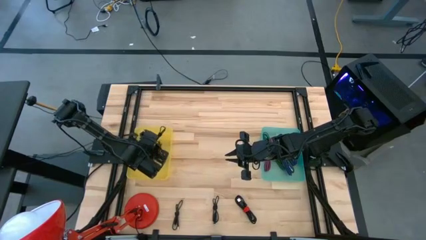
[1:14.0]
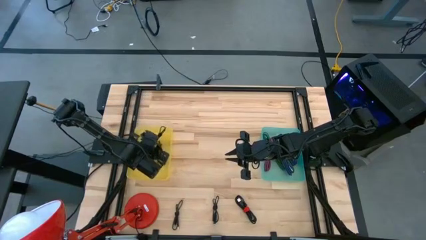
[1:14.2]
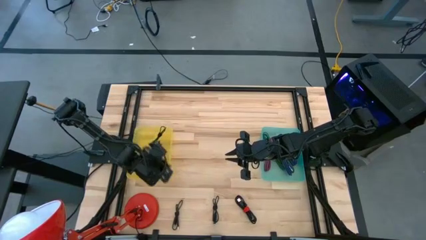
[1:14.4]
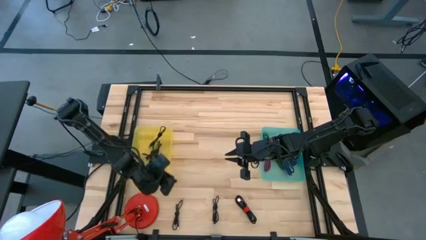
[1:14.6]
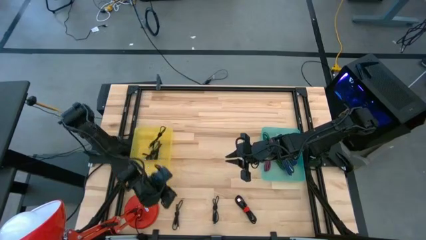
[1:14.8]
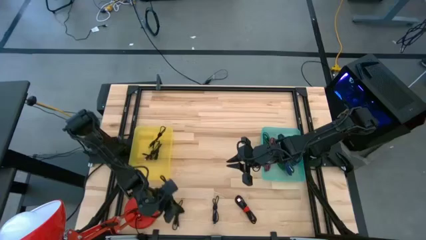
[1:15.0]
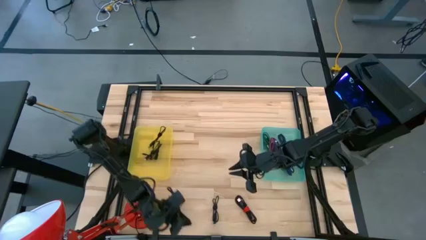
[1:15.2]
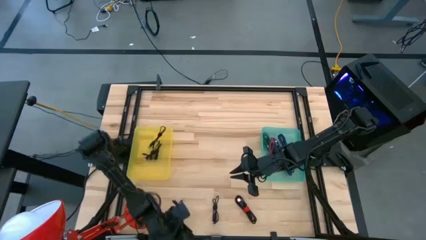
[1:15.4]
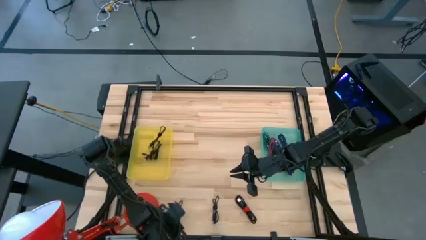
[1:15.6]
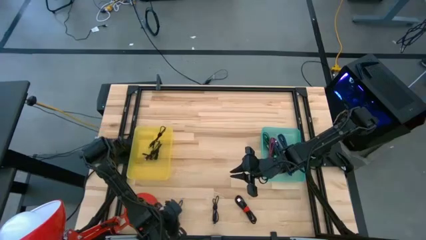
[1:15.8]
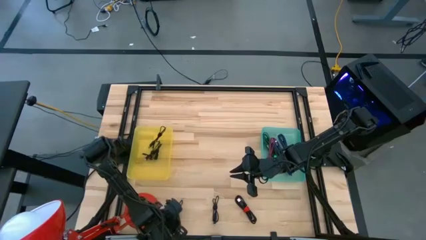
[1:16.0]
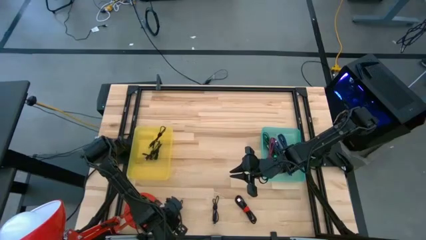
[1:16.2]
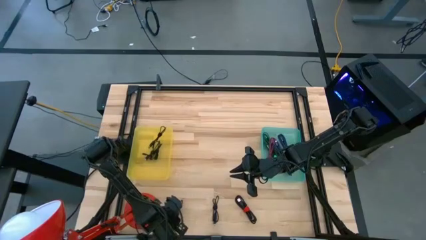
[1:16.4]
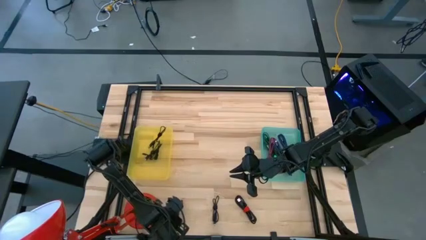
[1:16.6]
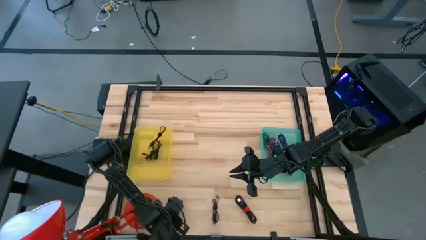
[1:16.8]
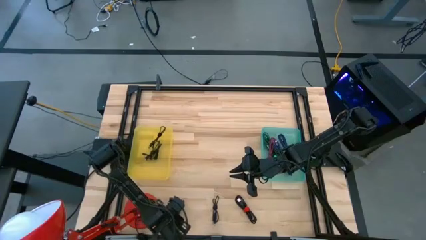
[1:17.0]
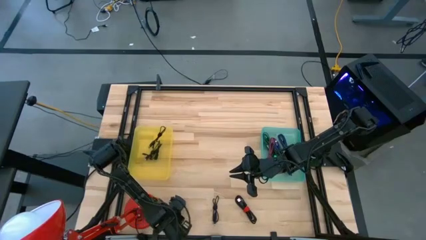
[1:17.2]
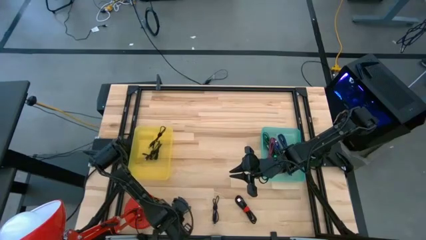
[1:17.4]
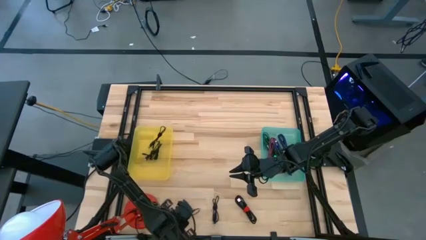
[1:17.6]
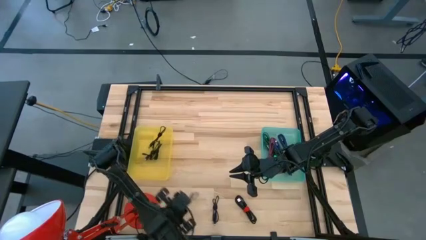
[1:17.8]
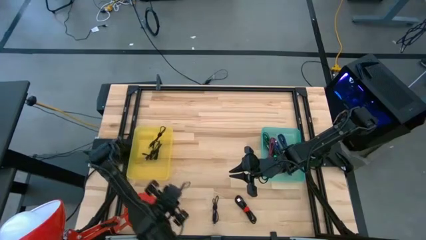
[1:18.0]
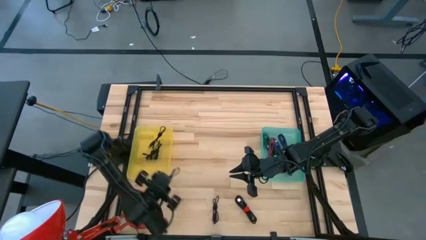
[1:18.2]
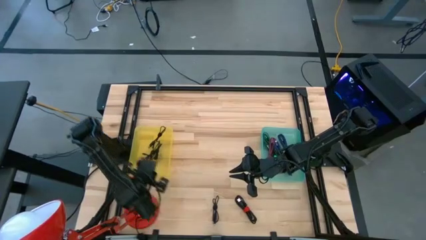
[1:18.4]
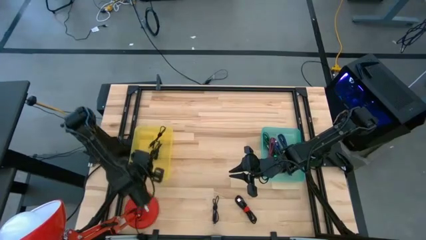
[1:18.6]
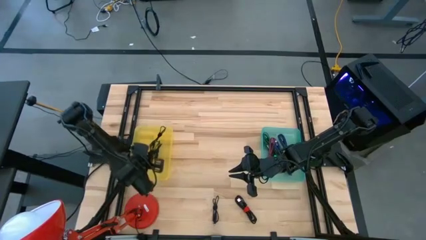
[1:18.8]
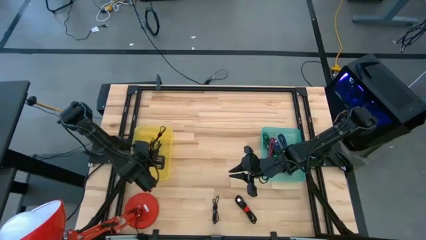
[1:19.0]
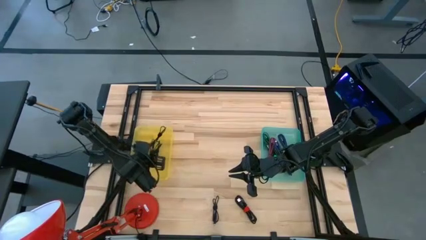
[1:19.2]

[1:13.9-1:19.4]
Task: Pick & Place USB Port
Put the black charger cable into the yellow bin

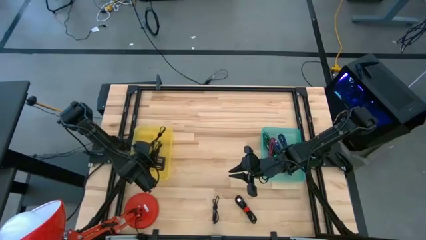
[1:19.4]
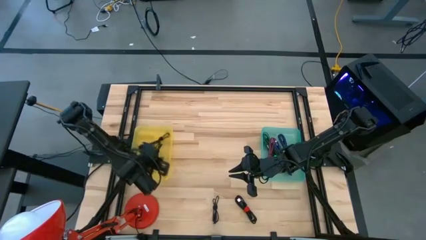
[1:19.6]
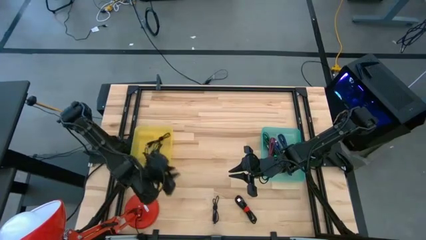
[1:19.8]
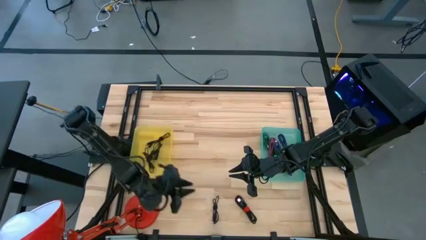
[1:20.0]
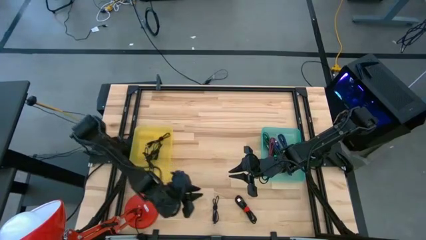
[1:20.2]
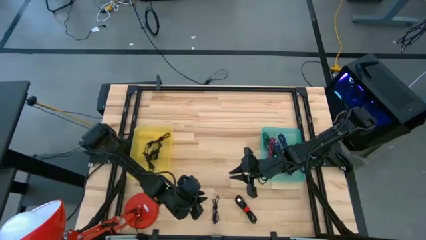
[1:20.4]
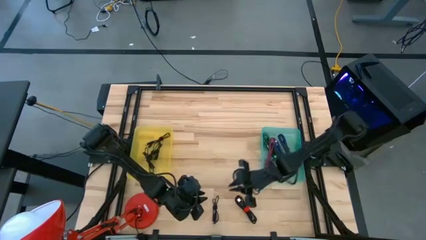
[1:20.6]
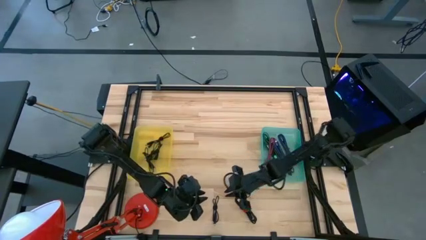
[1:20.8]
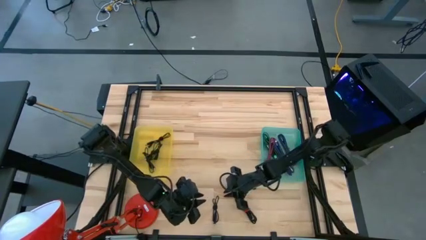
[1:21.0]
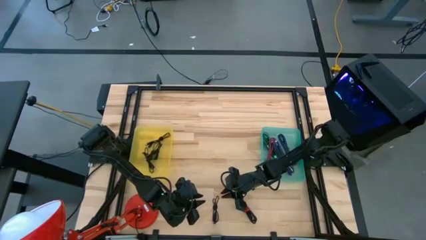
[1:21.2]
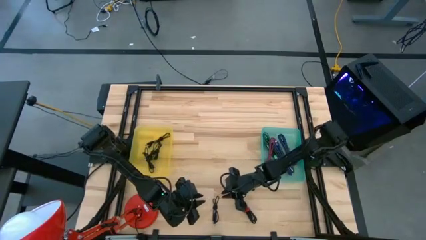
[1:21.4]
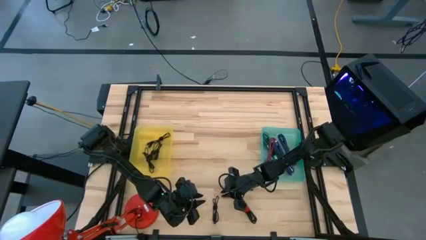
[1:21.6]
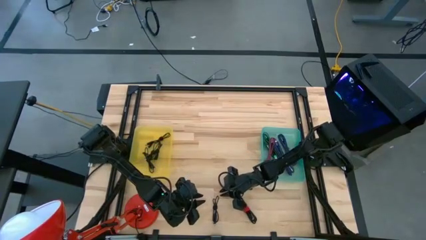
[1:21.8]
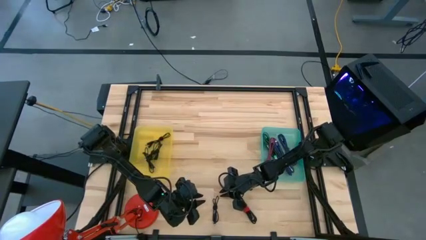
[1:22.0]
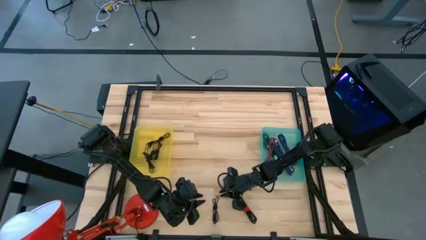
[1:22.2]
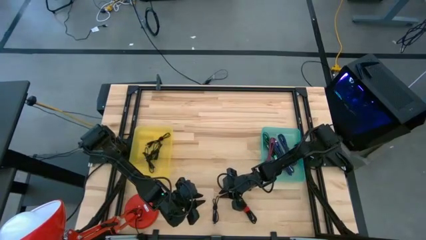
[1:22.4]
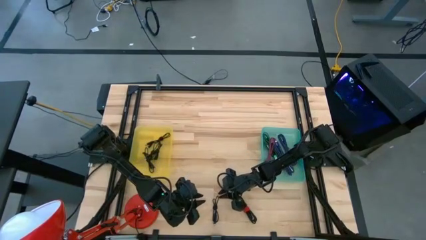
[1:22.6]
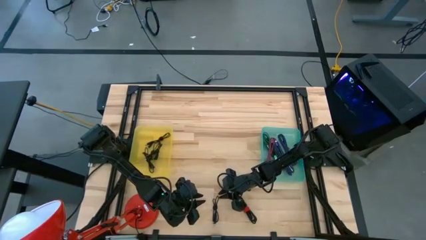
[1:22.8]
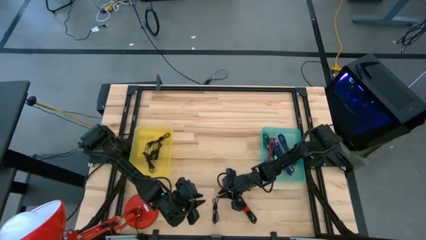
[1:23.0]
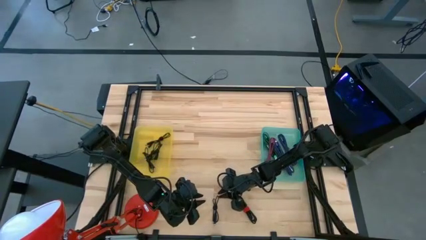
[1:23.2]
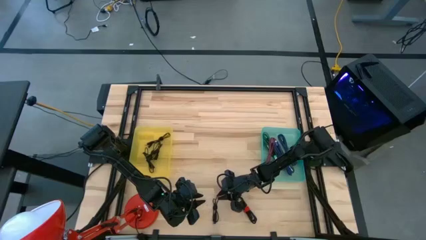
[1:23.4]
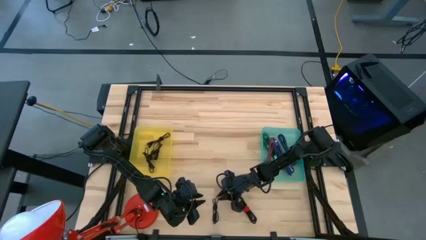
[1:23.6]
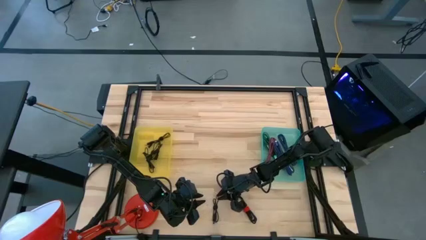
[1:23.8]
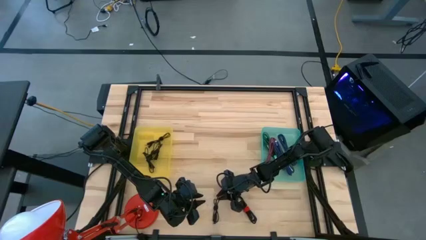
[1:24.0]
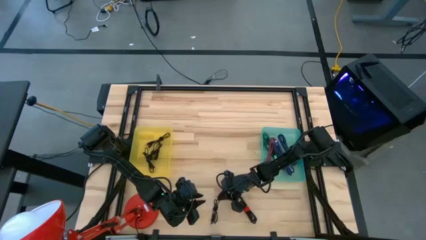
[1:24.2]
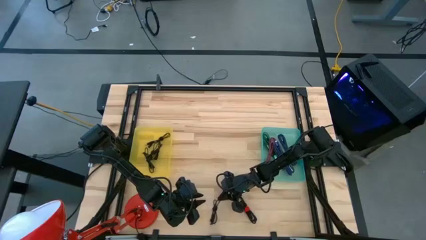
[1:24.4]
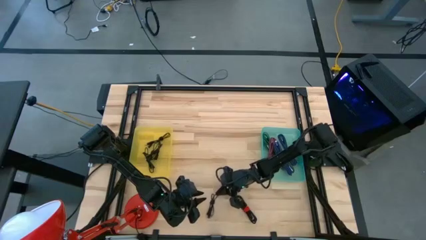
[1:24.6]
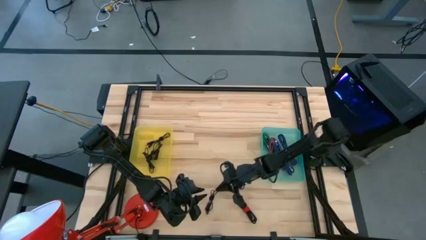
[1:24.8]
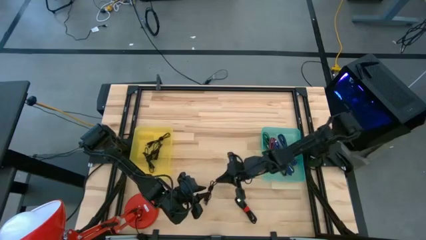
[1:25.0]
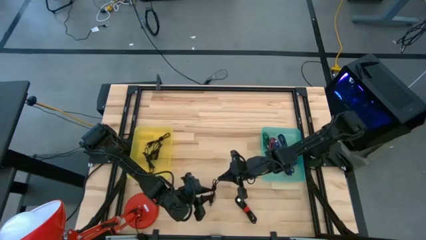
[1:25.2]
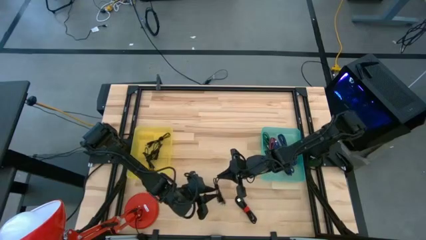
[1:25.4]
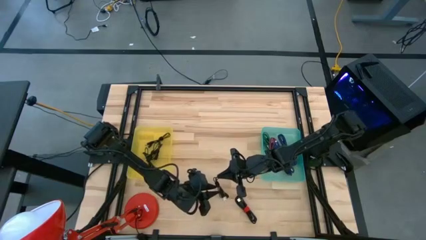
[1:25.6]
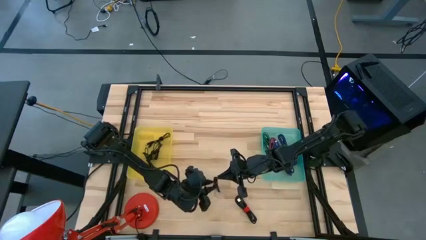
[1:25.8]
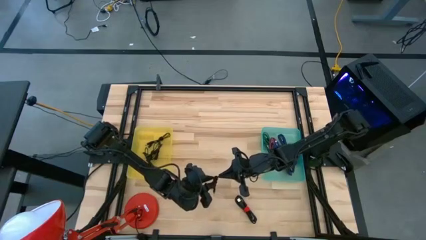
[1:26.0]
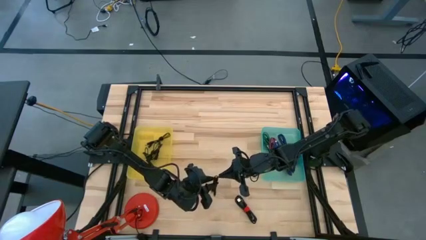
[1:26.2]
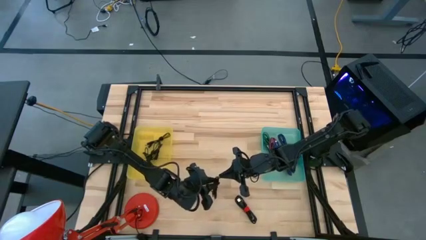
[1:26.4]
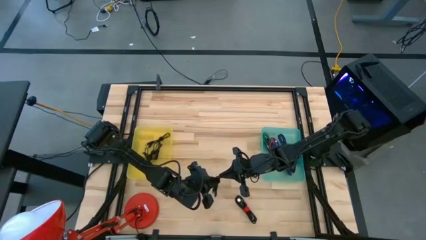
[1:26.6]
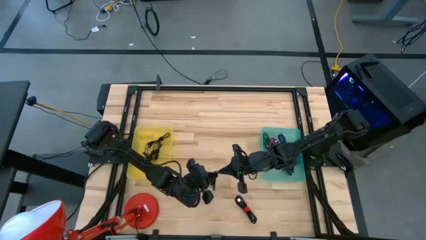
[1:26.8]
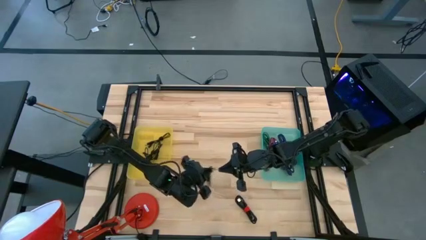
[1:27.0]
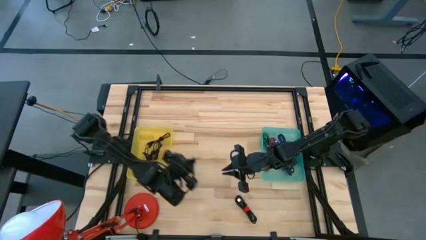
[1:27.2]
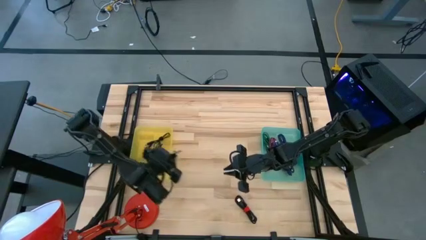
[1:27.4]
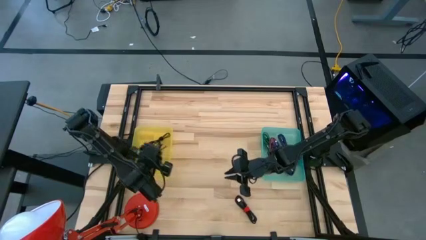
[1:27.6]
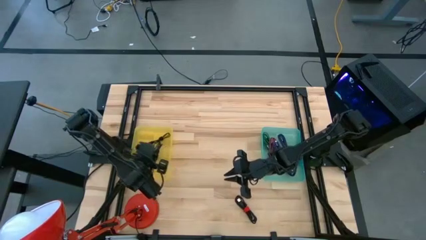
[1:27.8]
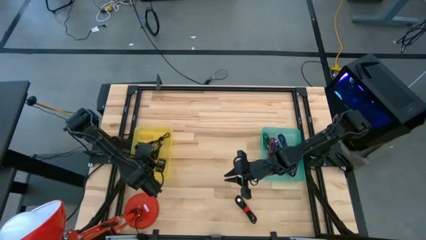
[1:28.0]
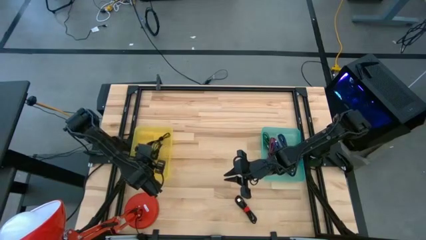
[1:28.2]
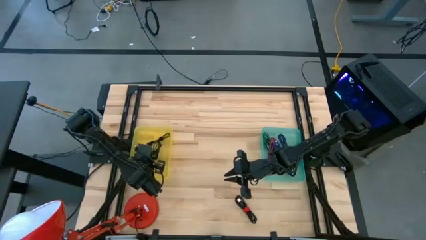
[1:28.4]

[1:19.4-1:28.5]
Put the black charger cable into the yellow bin
